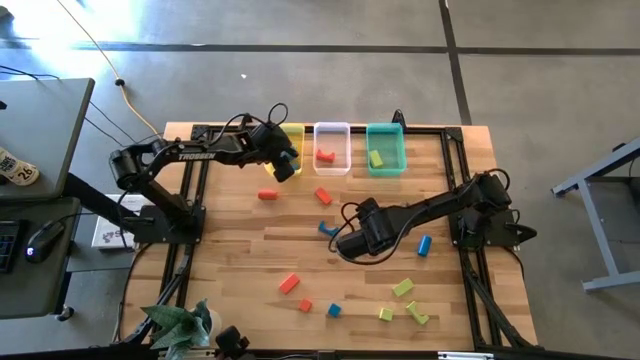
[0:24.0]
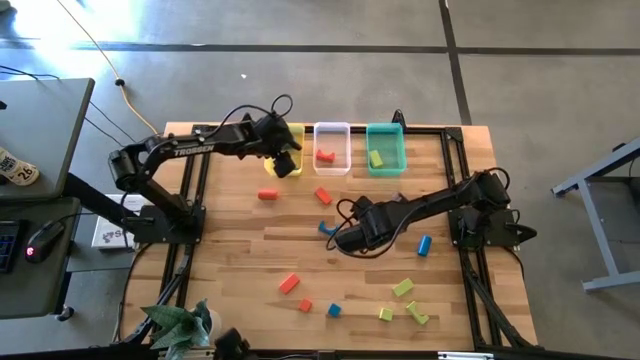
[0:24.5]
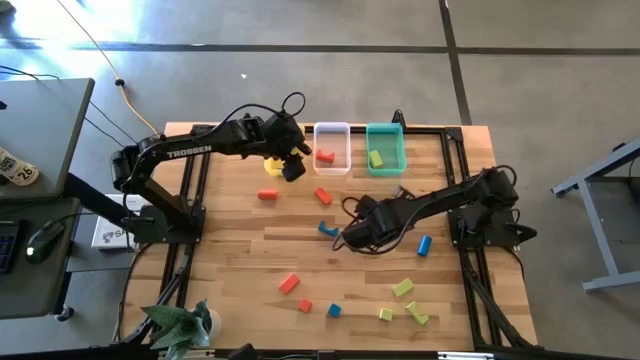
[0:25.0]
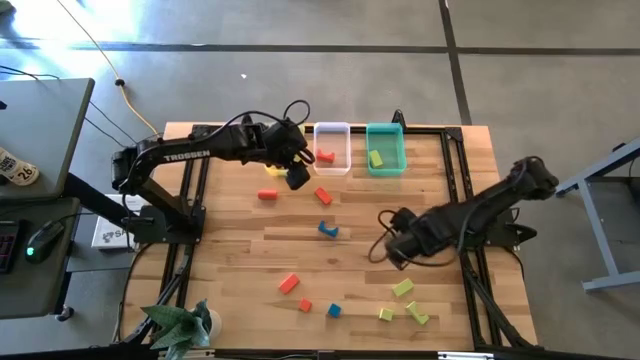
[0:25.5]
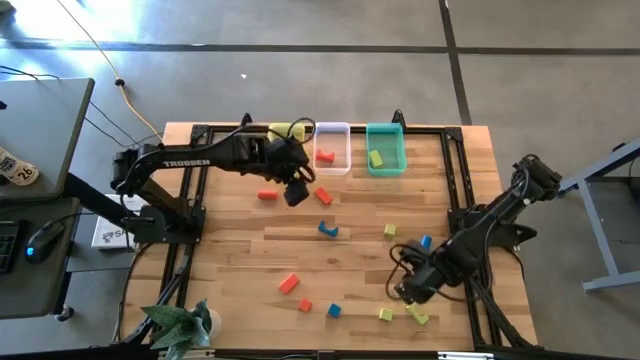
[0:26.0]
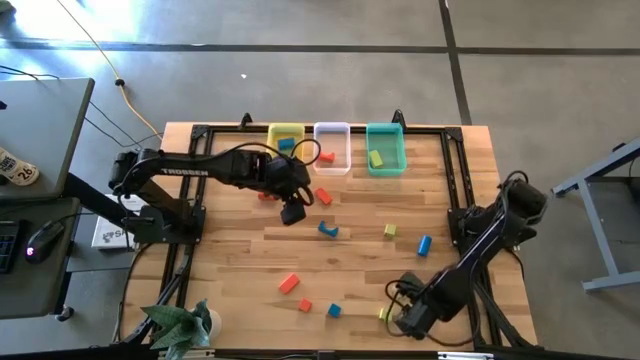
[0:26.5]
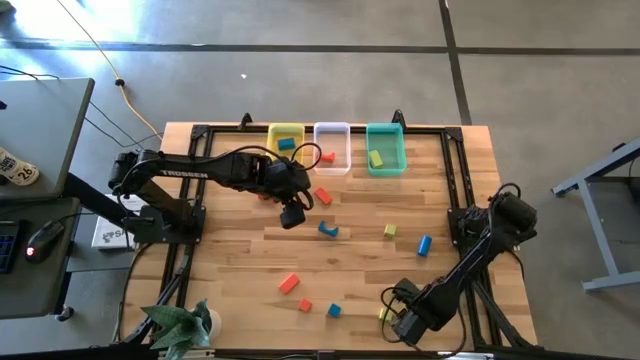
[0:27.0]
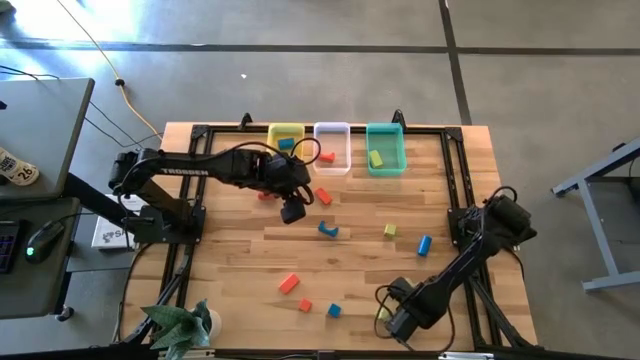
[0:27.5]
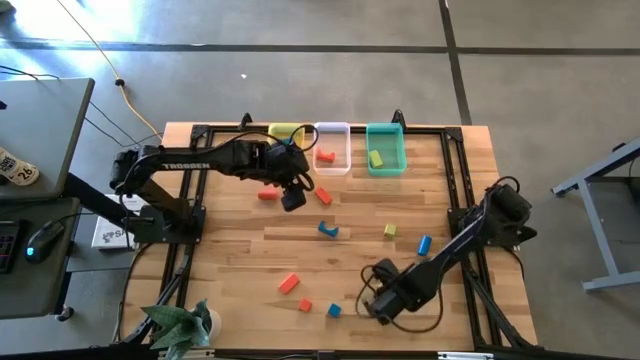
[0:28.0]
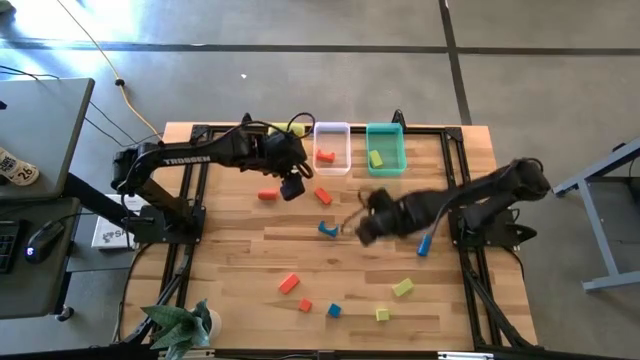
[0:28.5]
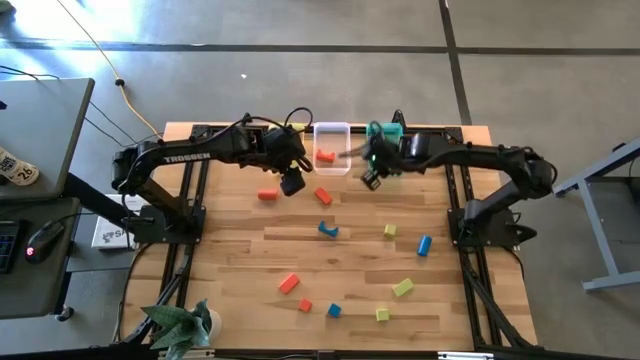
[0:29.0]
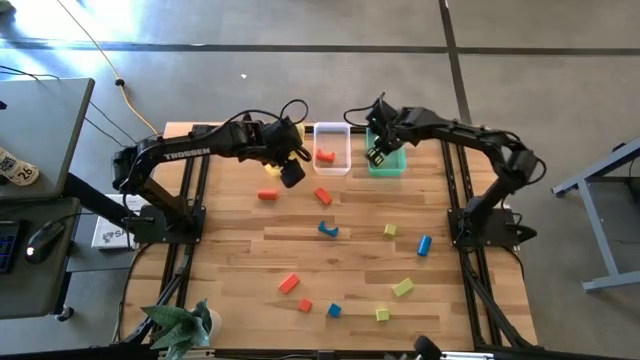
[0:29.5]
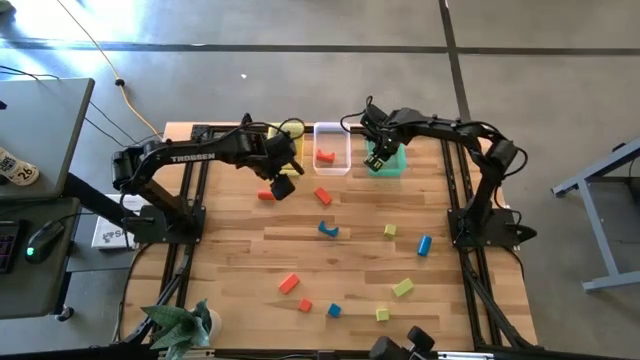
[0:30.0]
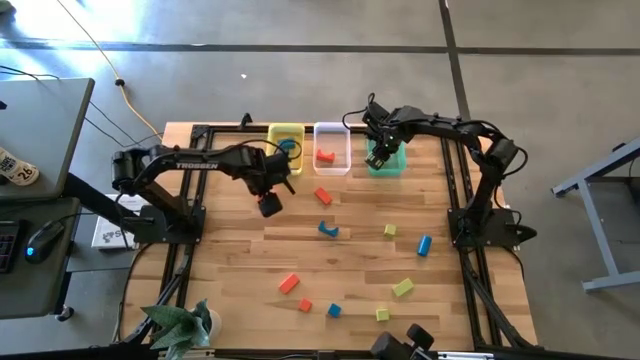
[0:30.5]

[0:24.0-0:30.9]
Task: Sort & place blocks by color
Put the green block into the green bin

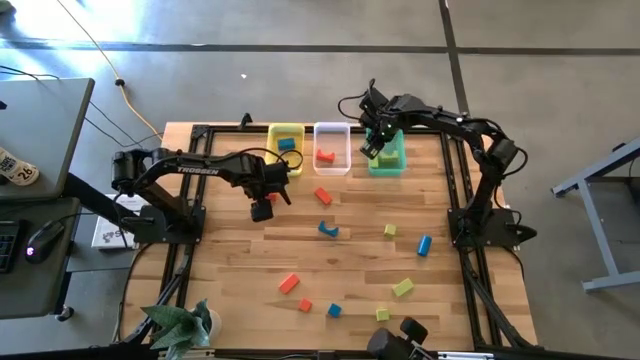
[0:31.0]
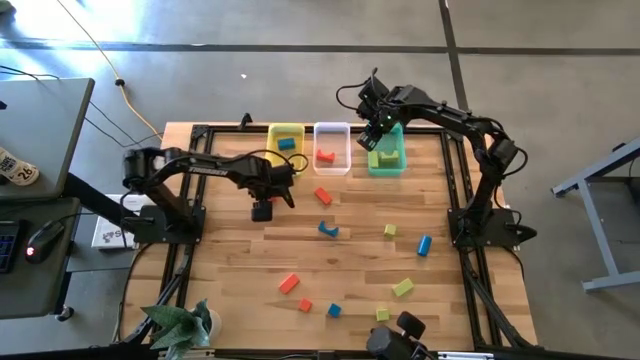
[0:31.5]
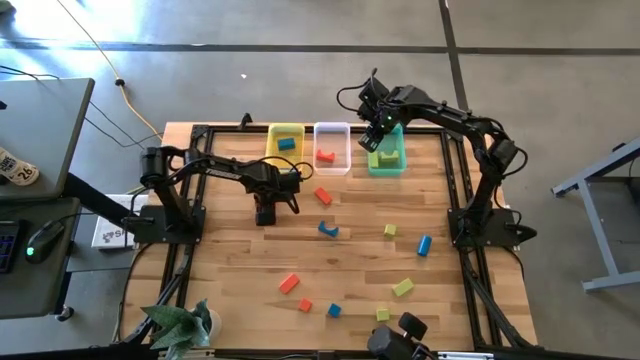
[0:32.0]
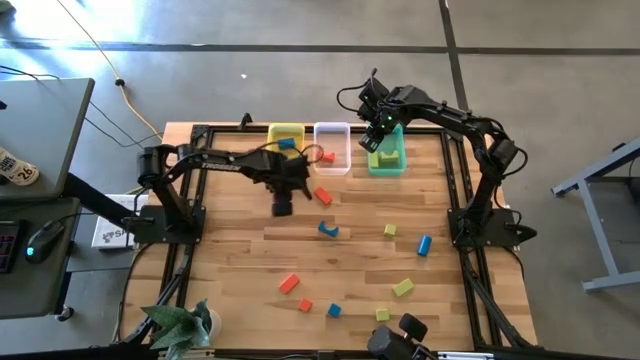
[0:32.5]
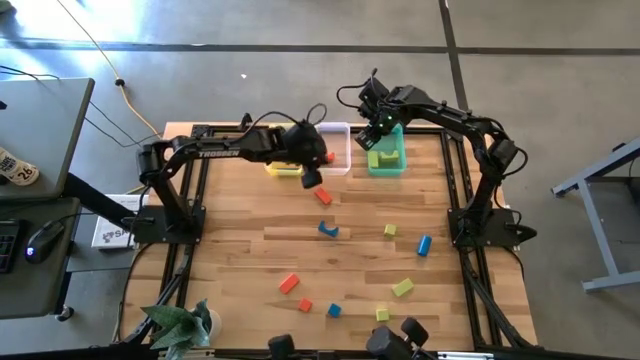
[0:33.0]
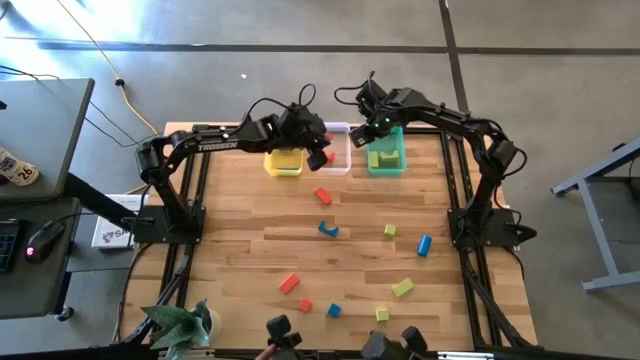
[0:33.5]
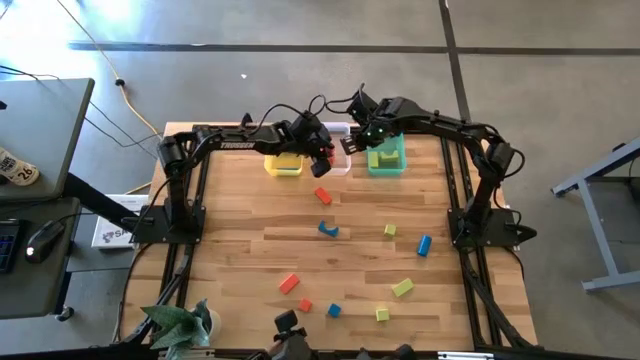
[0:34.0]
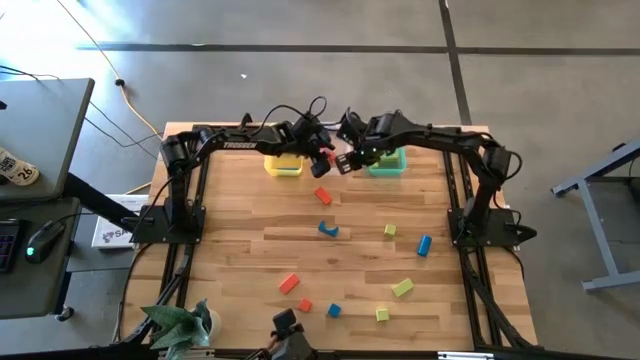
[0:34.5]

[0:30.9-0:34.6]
Put the orange block into the transparent bin

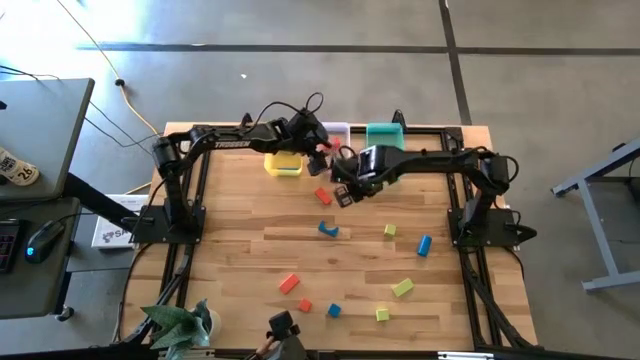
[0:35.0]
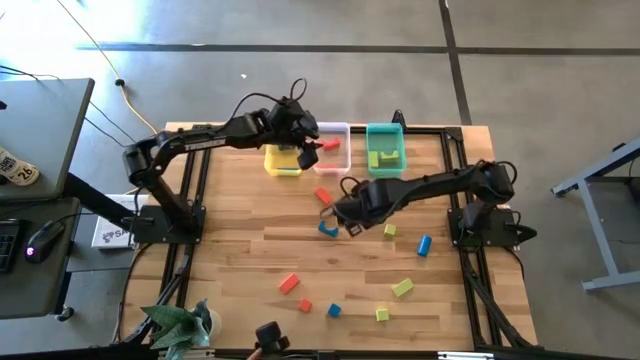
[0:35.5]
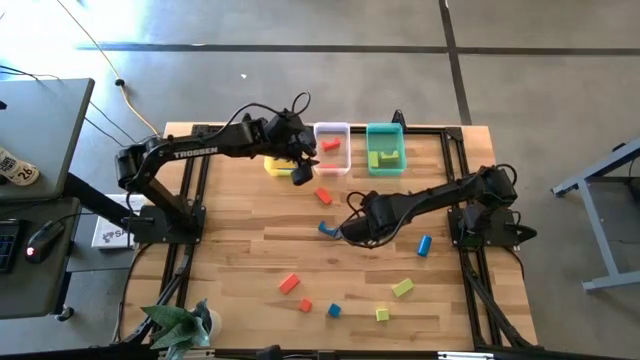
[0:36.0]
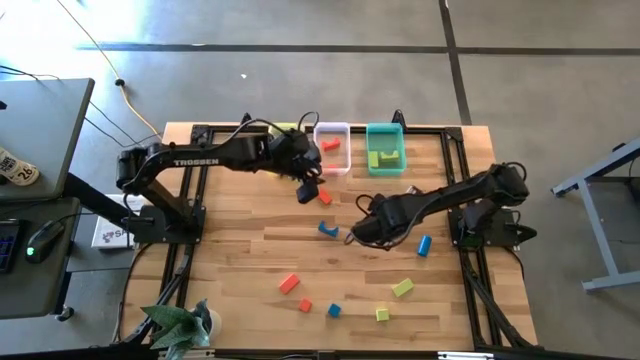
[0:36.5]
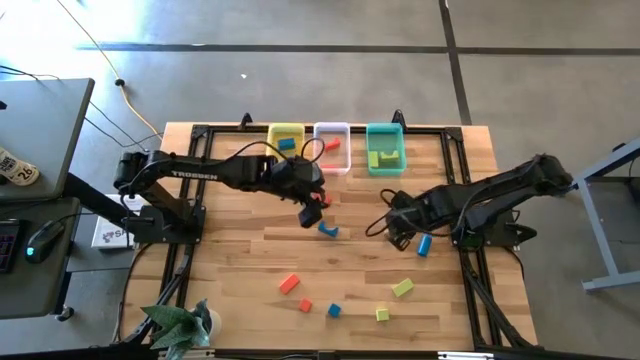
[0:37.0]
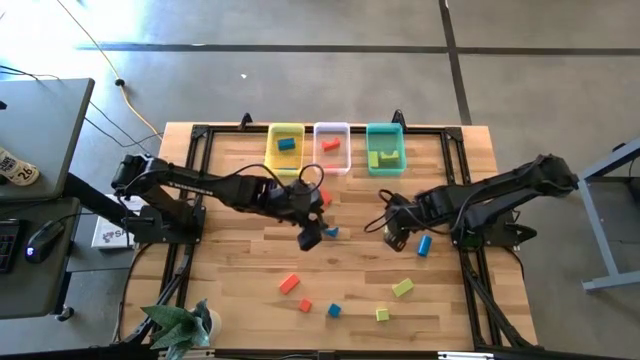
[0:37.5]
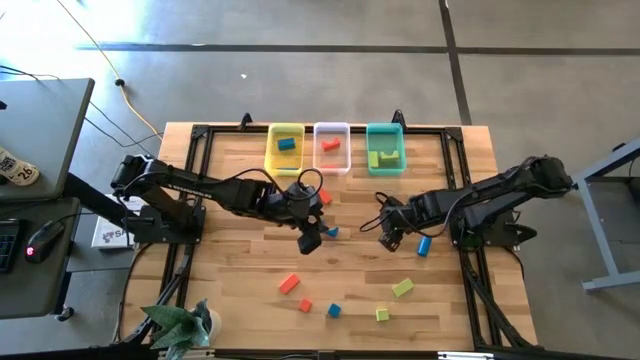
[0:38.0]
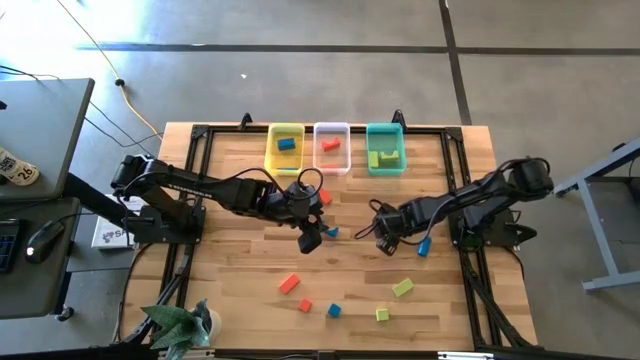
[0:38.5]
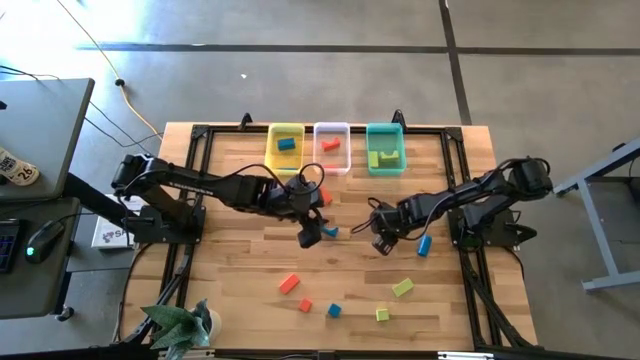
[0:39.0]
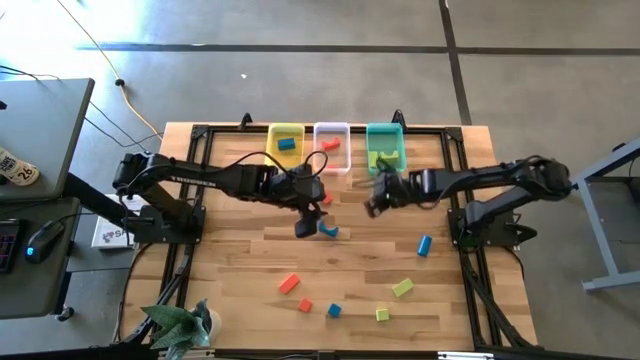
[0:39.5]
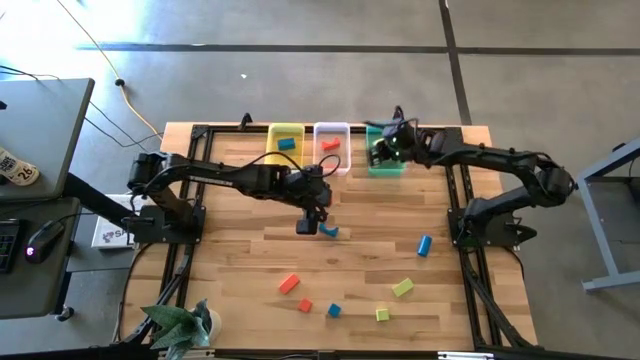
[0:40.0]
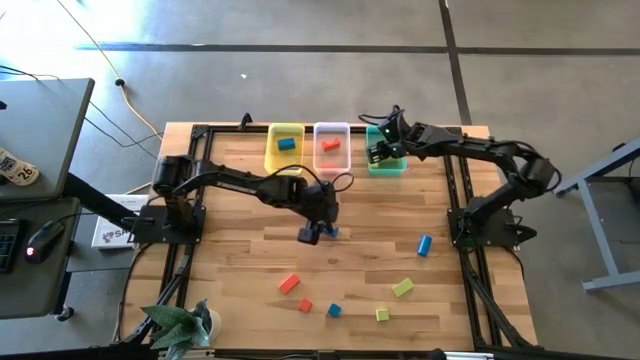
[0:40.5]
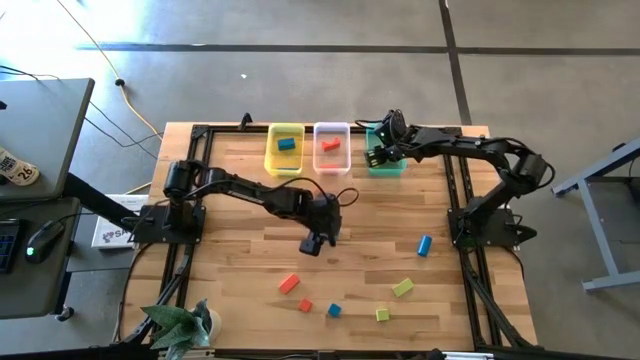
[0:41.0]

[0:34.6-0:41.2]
Put the green block into the green bin

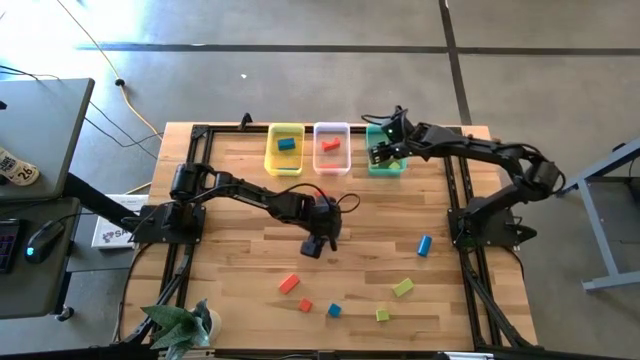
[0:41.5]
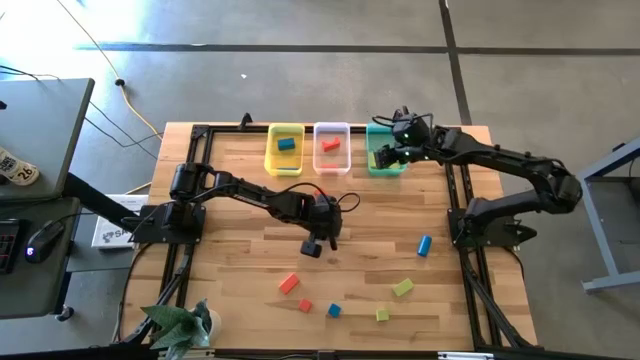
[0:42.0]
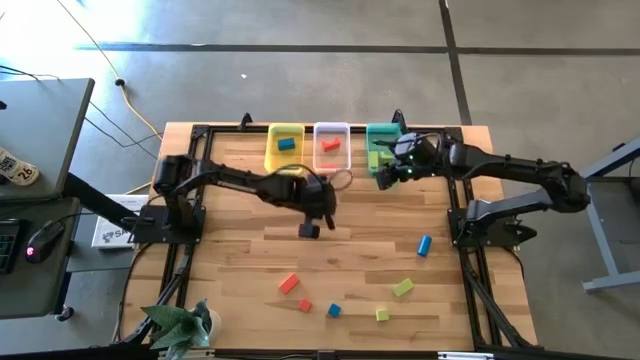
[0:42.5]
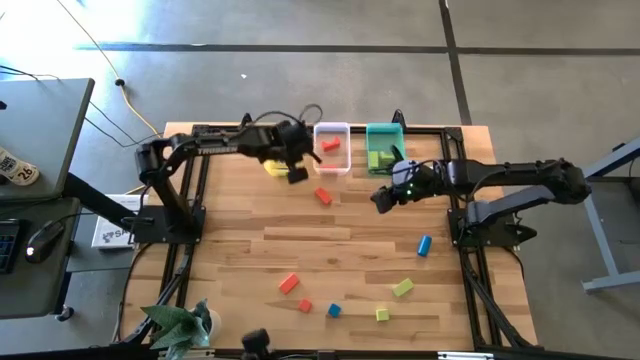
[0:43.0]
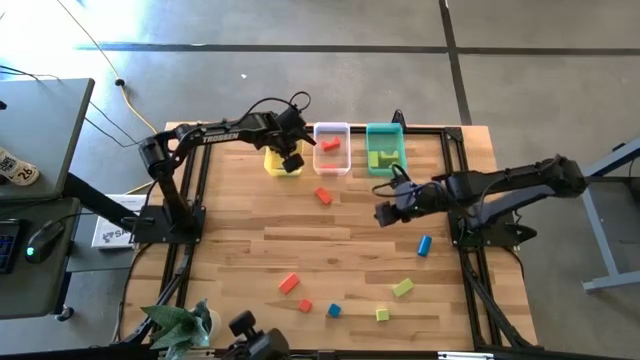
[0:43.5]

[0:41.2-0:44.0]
Put the blue block into the yellow bin
